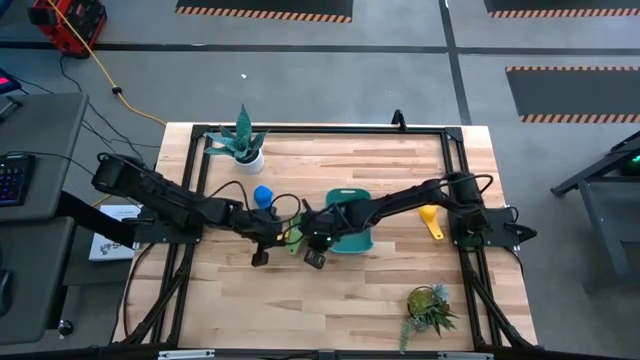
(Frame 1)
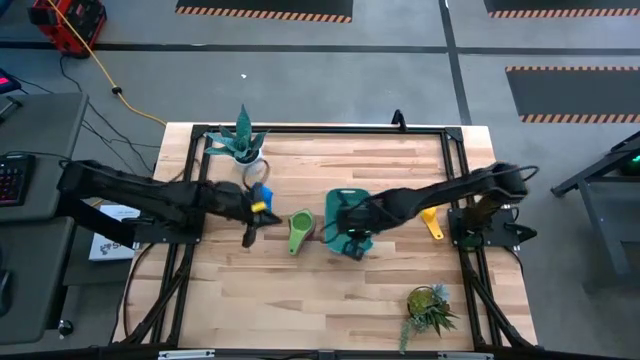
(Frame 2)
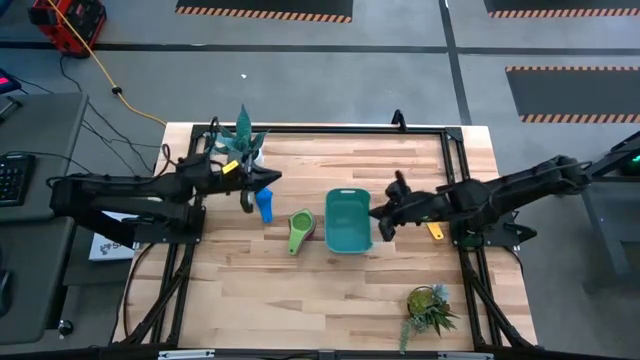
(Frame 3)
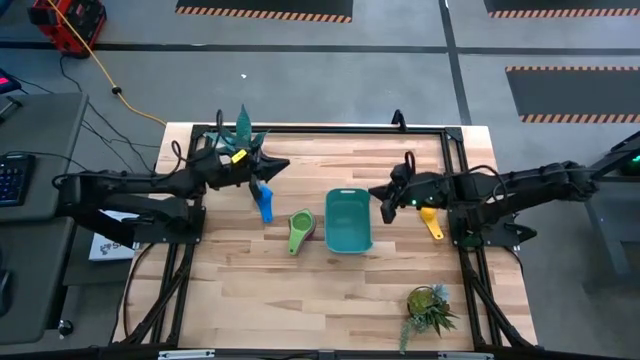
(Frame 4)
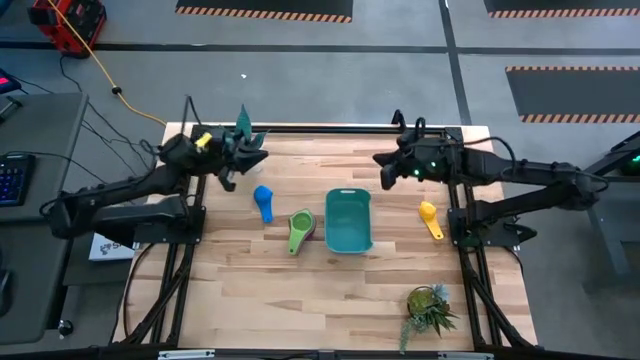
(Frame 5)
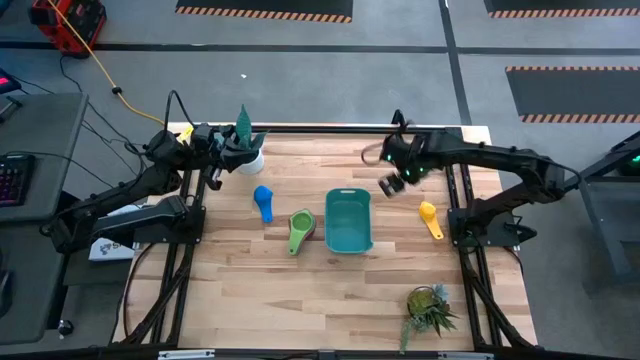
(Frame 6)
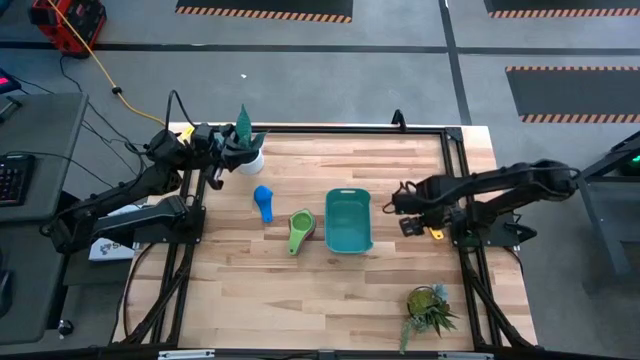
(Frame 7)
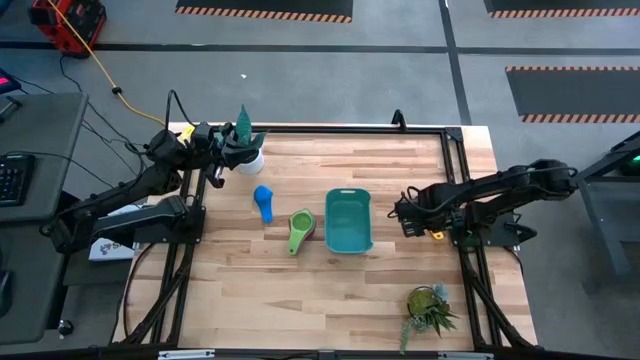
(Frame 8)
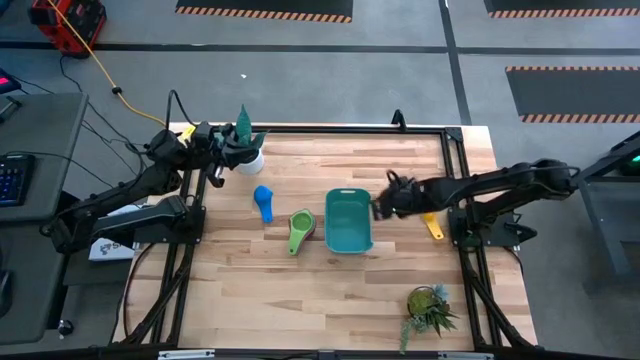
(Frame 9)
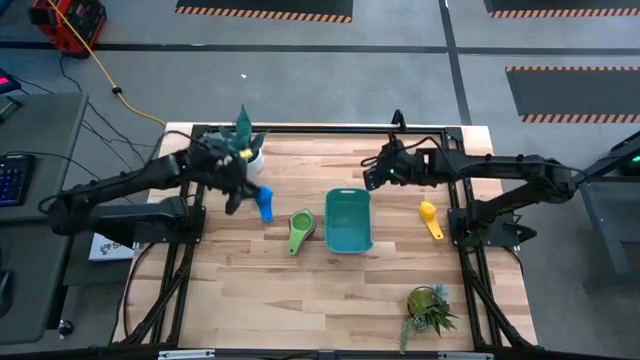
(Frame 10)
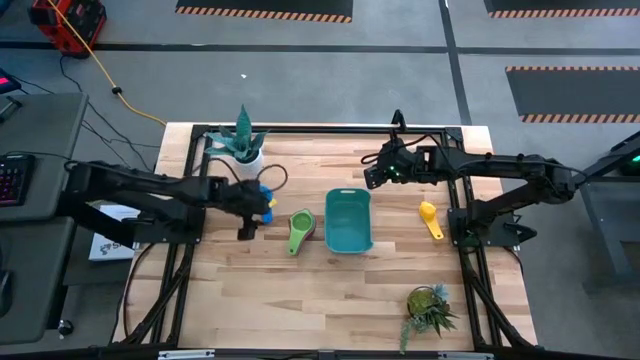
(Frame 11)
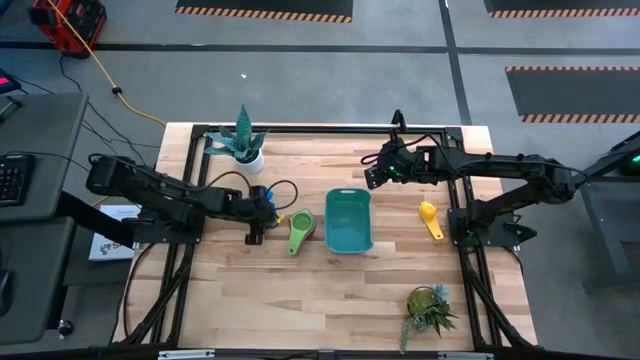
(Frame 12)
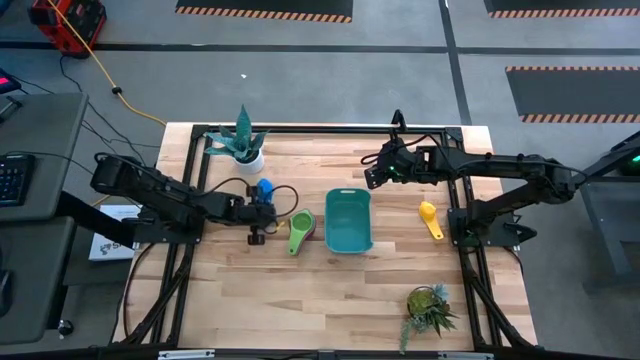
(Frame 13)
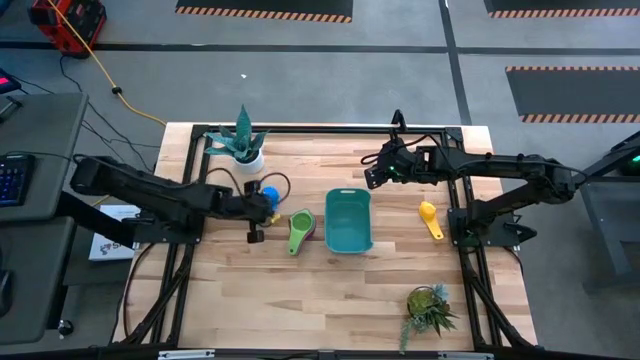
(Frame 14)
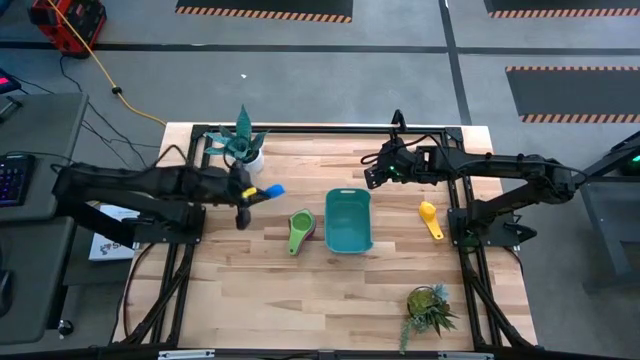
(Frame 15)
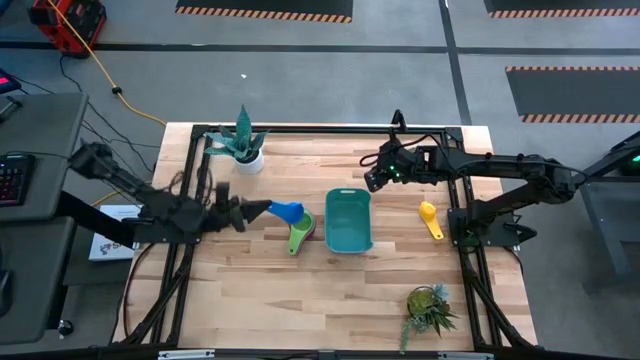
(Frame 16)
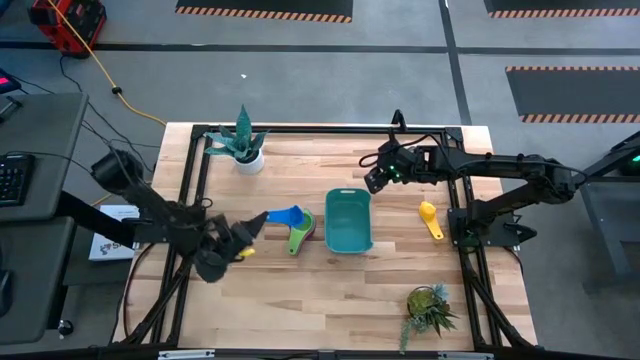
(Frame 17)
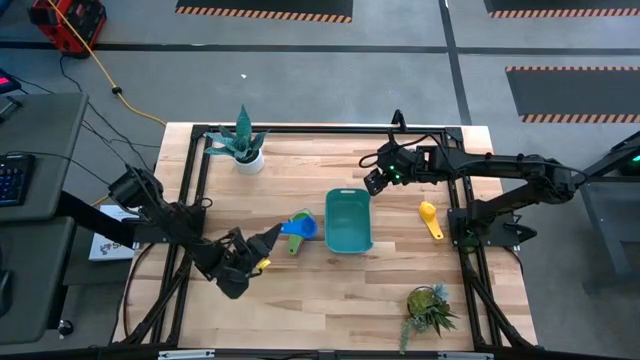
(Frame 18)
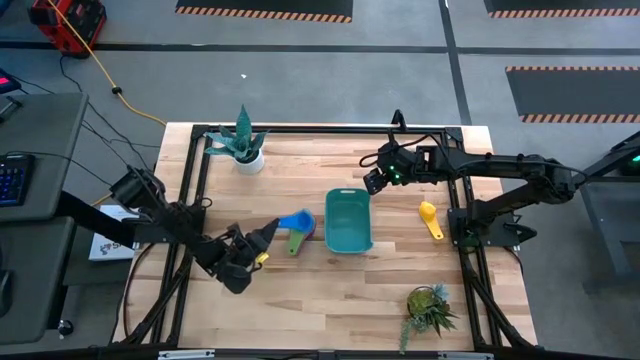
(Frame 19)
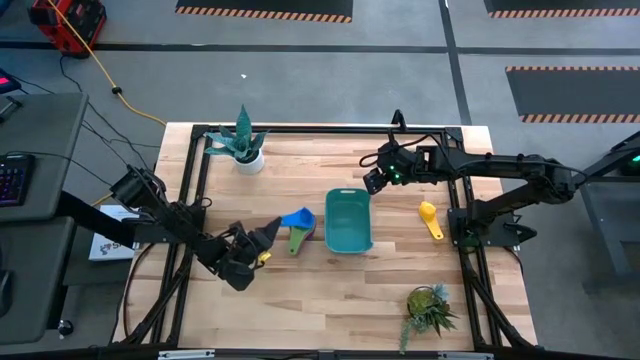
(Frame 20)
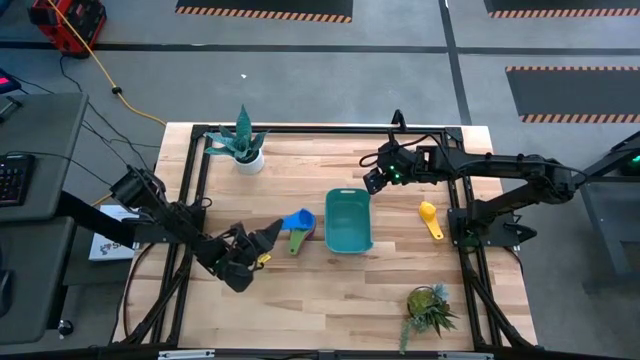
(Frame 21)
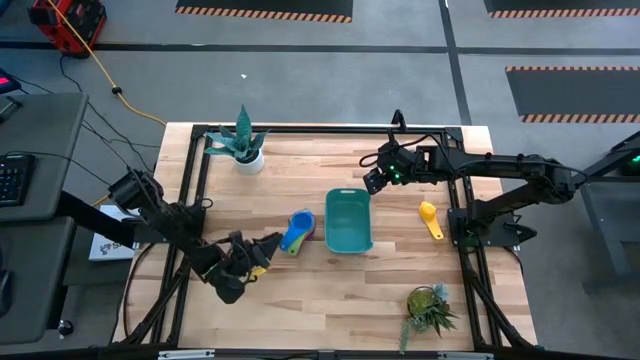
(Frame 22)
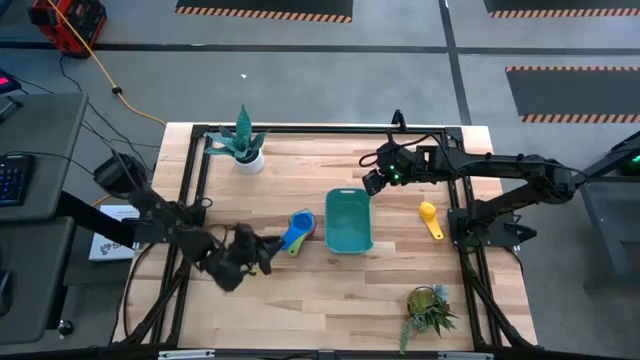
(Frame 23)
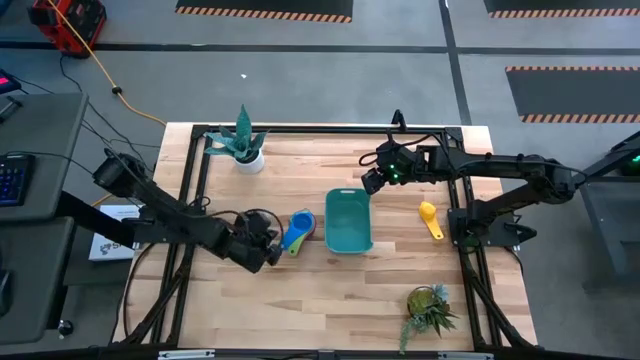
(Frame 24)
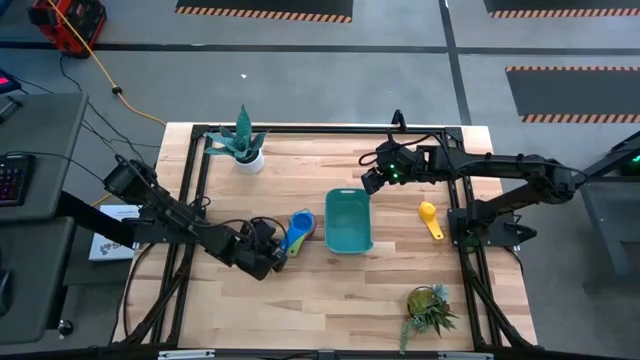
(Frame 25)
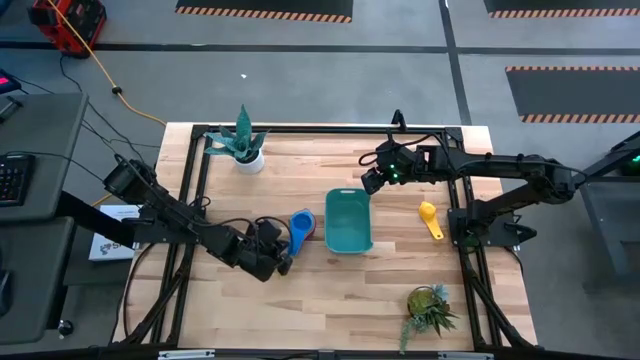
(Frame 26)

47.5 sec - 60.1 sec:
Task: Nest measuring cups in basket
Stack the blue measuring cup on top of the green measuring cup

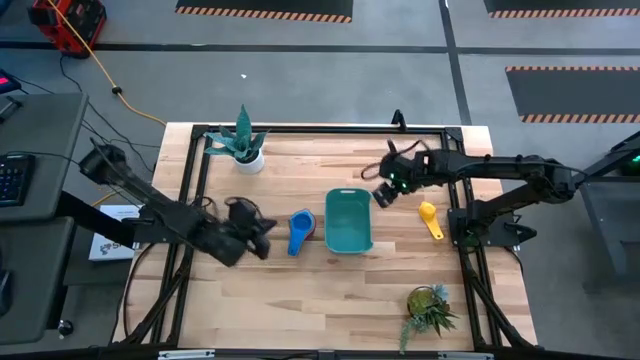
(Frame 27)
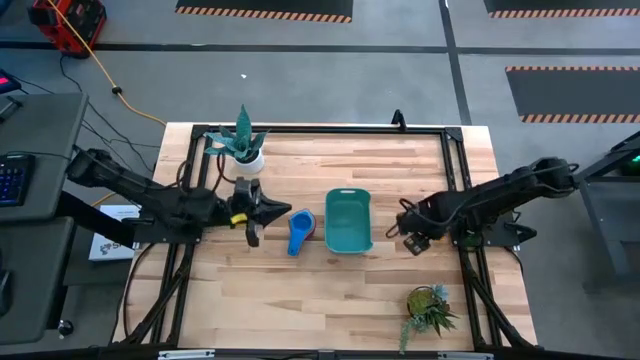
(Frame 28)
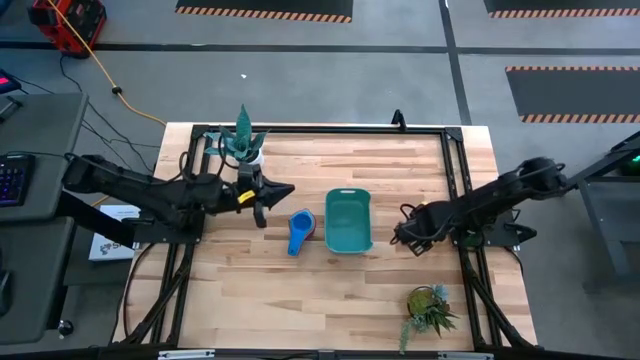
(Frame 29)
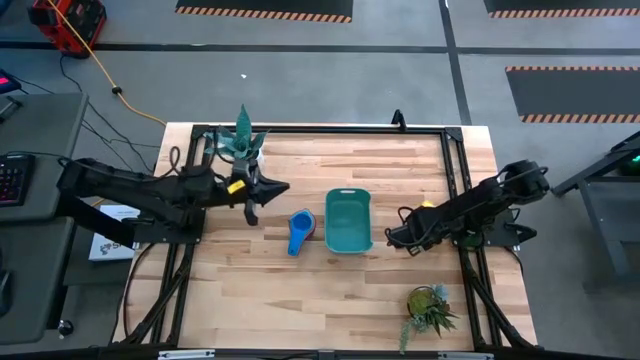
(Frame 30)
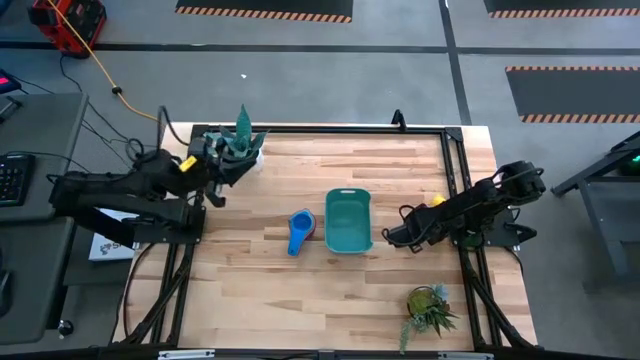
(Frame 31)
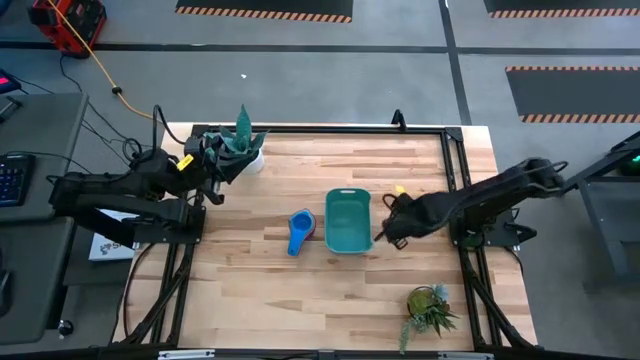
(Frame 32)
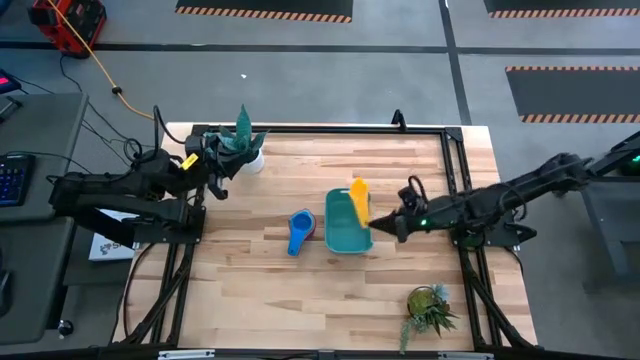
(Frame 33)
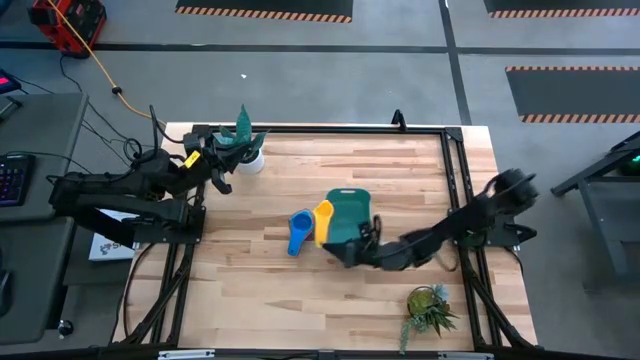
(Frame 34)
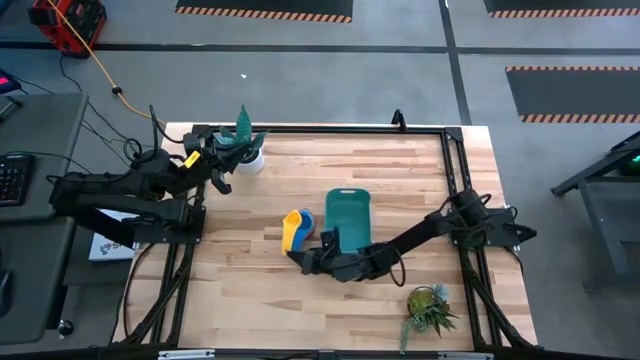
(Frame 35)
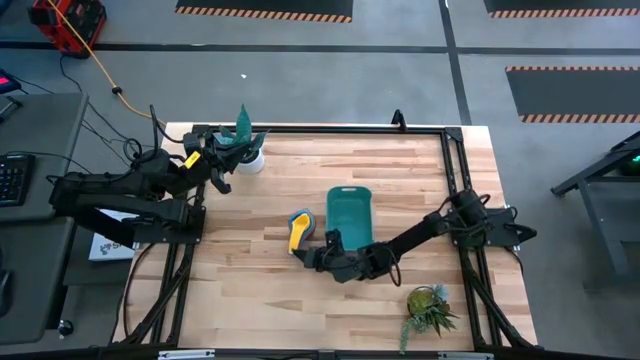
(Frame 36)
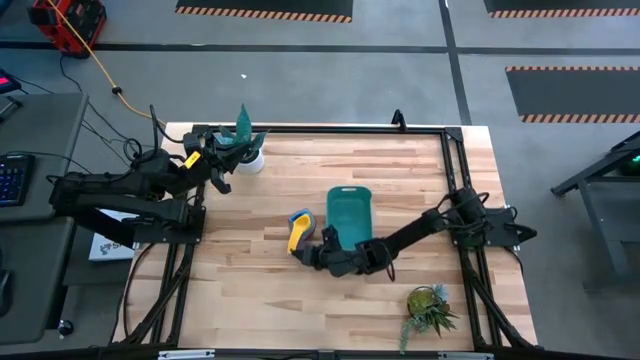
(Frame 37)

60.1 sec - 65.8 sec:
Stack the yellow measuring cup on top of the blue measuring cup

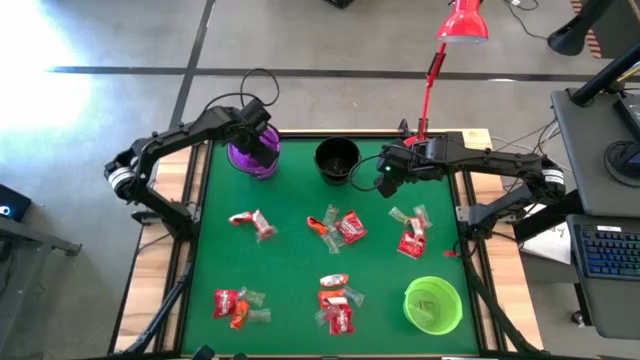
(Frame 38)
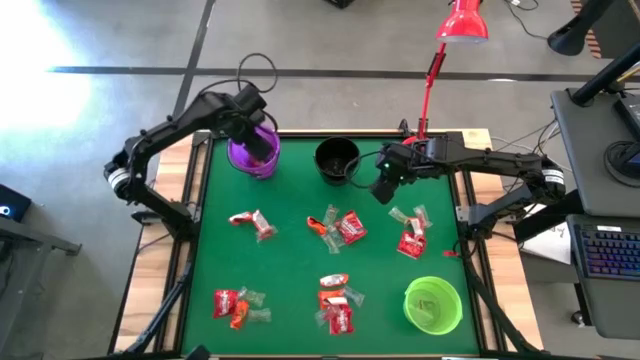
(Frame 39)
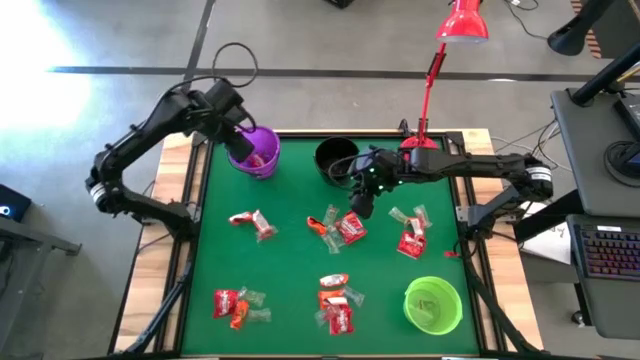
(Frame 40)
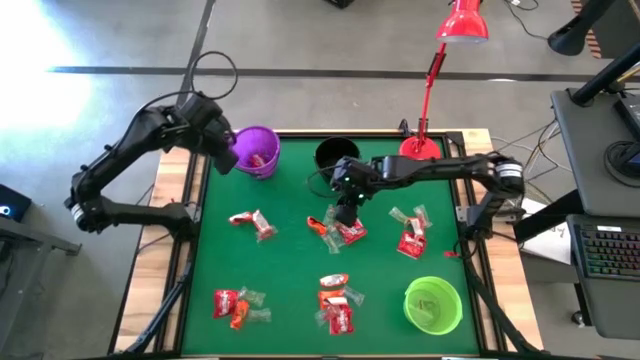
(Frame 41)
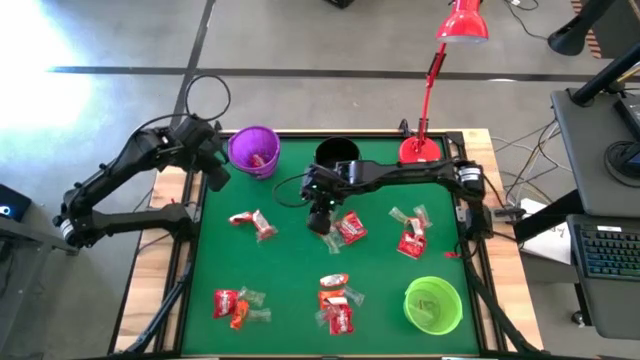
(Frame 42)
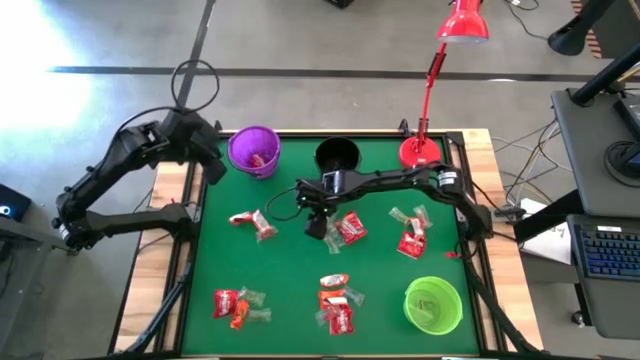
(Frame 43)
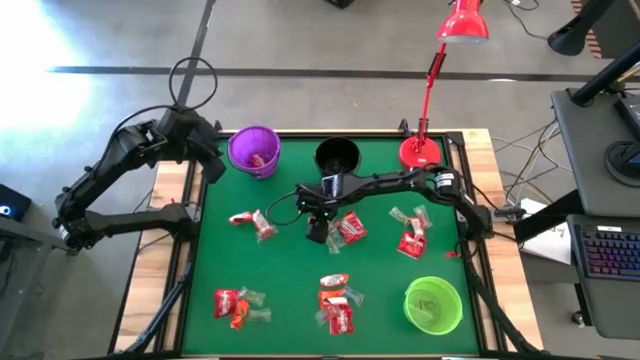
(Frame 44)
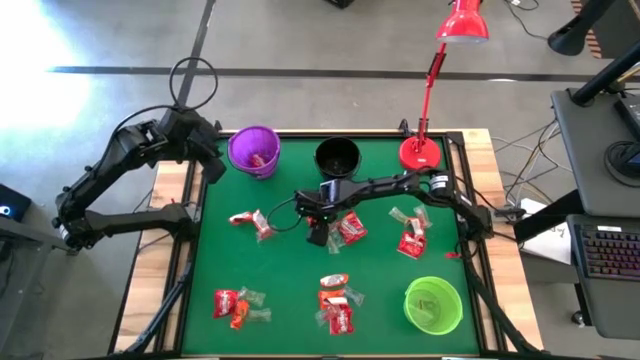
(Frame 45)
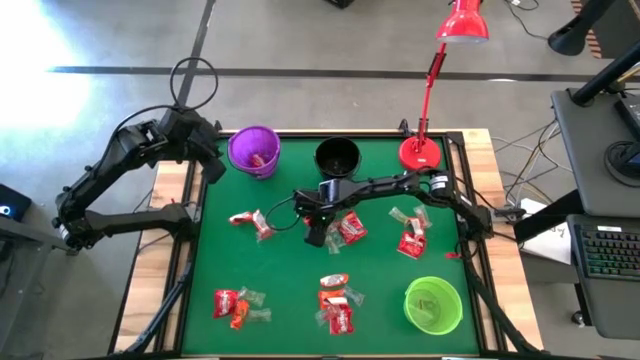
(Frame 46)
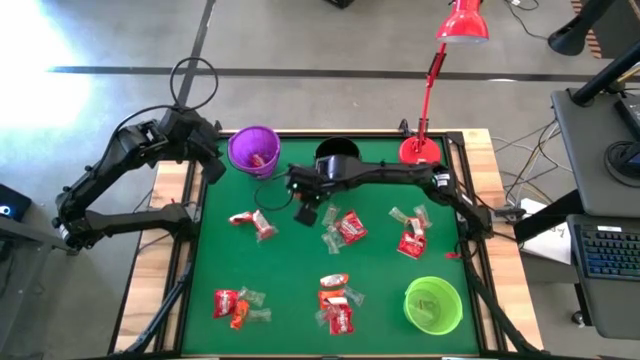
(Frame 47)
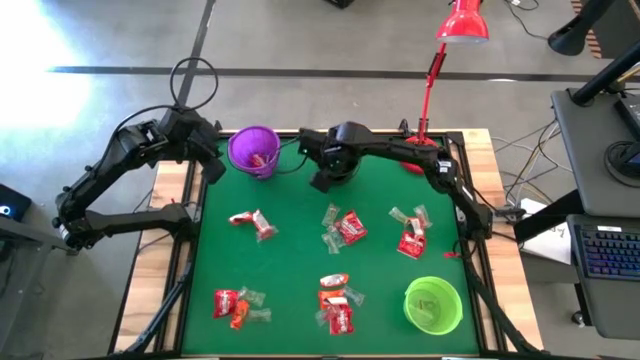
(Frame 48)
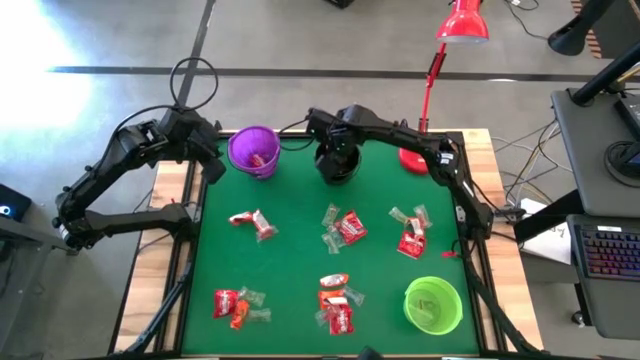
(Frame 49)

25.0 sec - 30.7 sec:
Task: Sort candy
Put the orange candy into the black bucket
